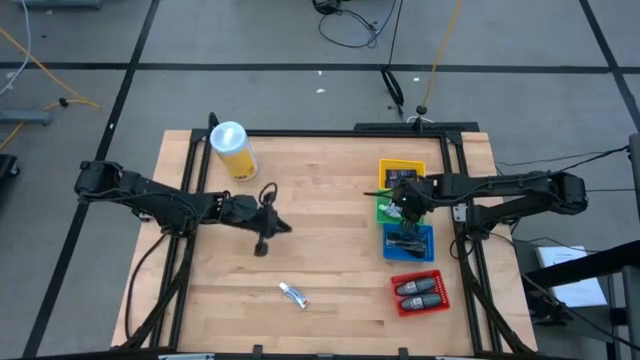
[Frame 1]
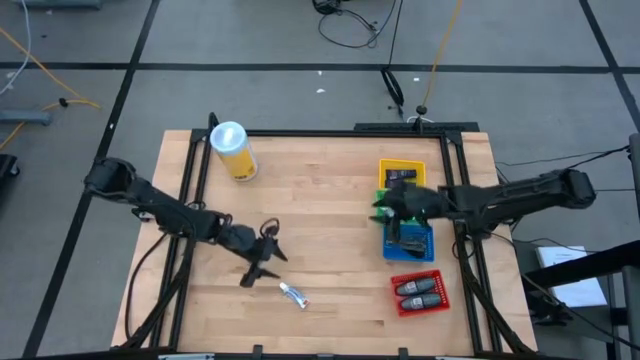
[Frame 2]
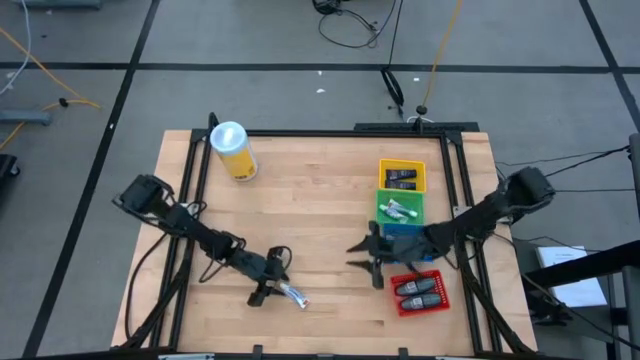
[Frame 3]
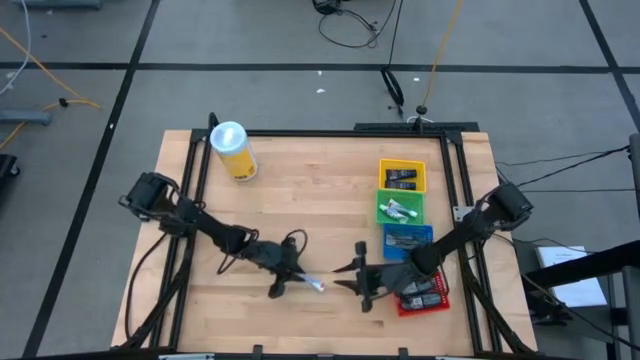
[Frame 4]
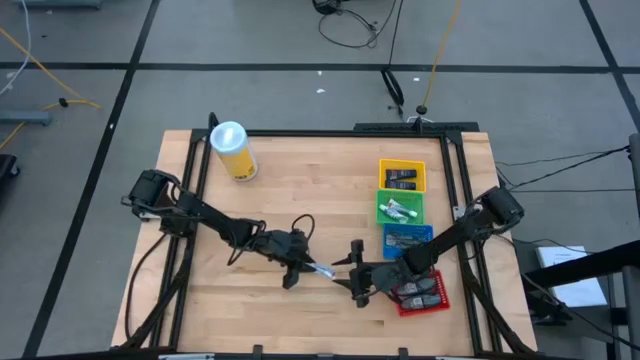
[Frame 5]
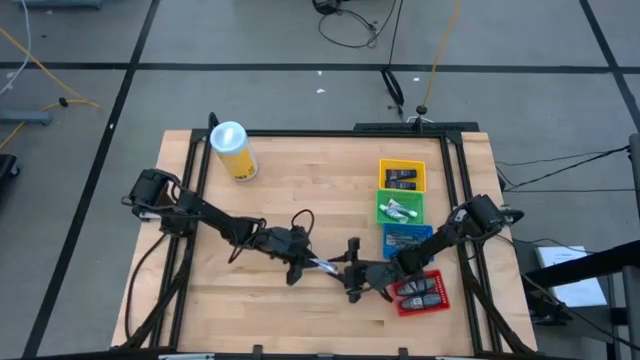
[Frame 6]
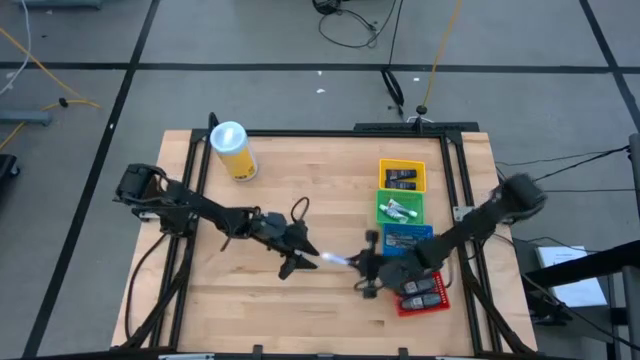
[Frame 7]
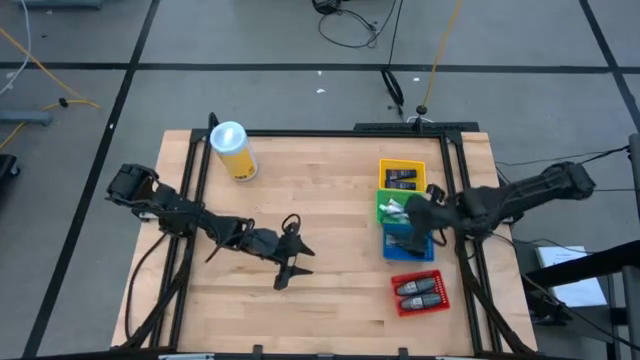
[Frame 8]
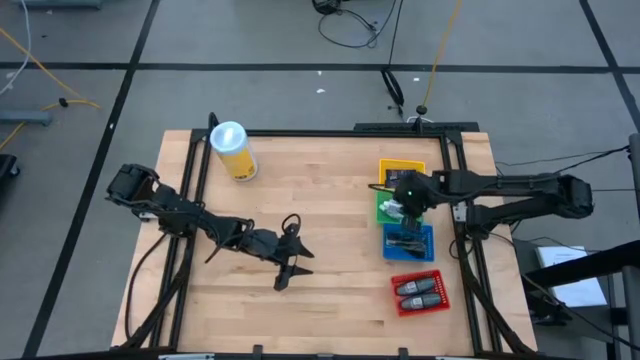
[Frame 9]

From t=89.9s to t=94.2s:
Task: Pick & Place Travel size toiletries
Put the white toothpaste into the green bin

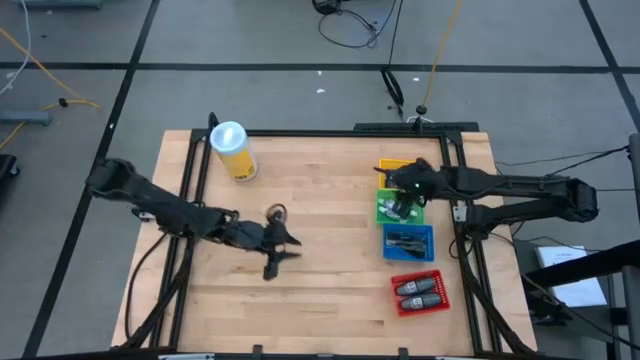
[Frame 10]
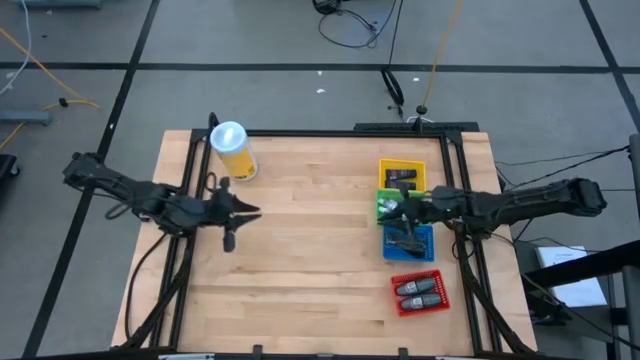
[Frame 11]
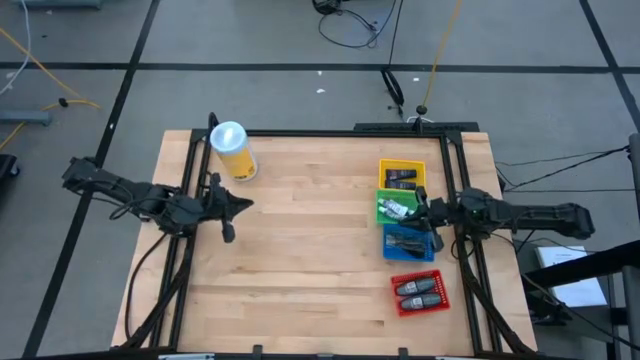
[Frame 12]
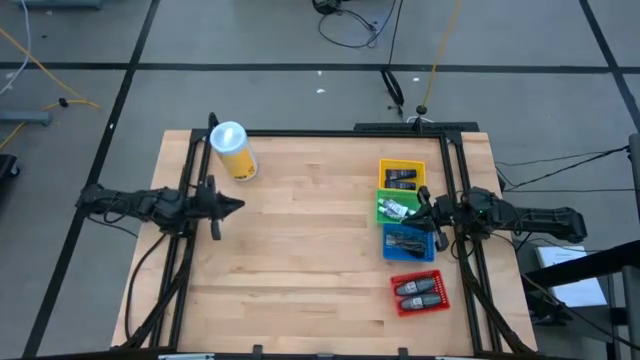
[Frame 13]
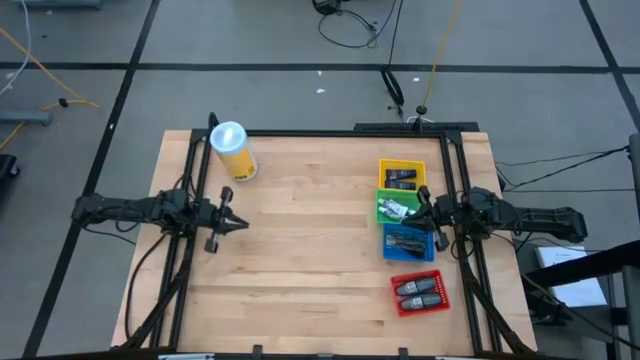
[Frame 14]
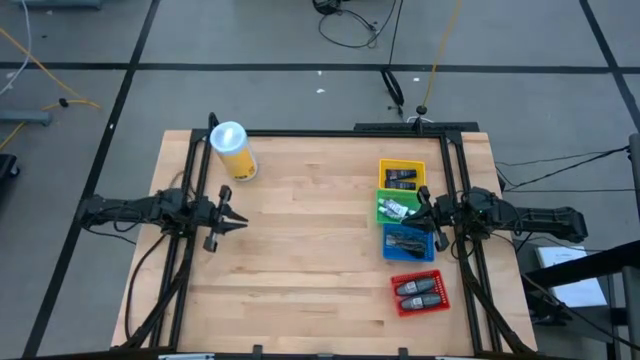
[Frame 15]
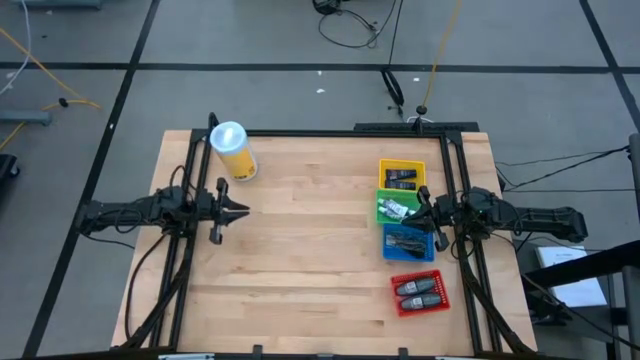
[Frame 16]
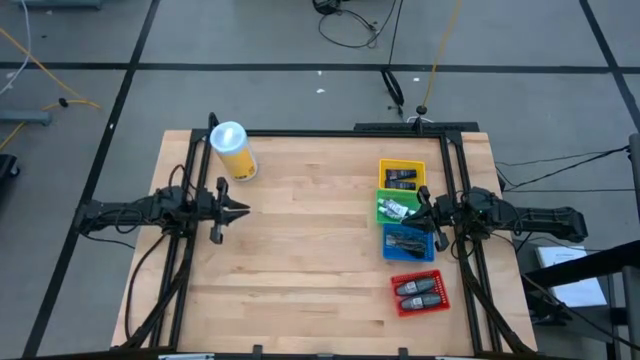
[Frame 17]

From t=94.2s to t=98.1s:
Return to Home Position

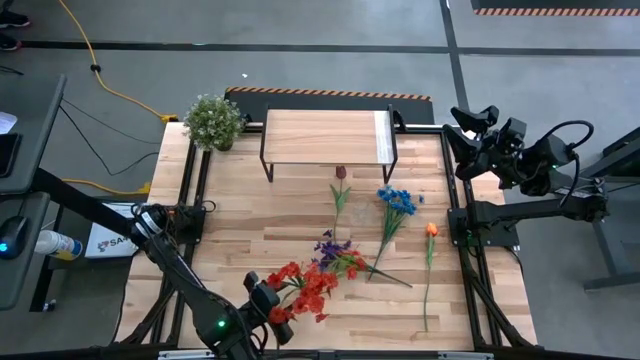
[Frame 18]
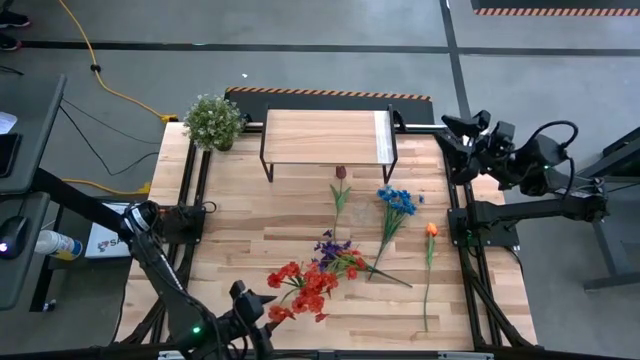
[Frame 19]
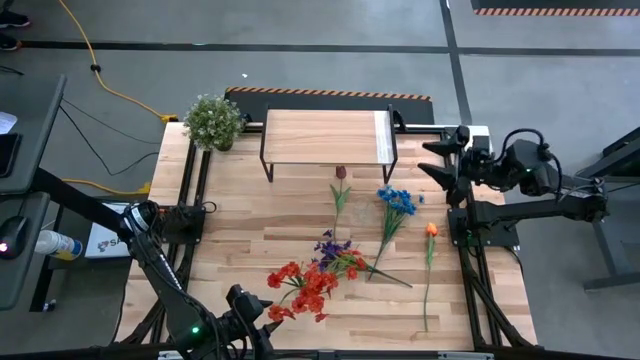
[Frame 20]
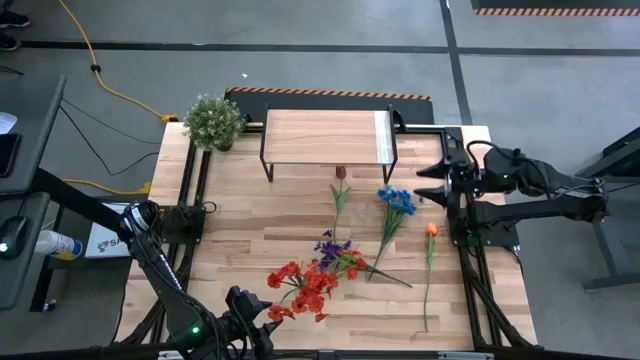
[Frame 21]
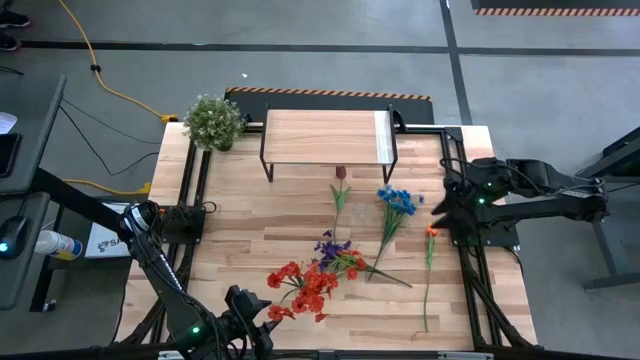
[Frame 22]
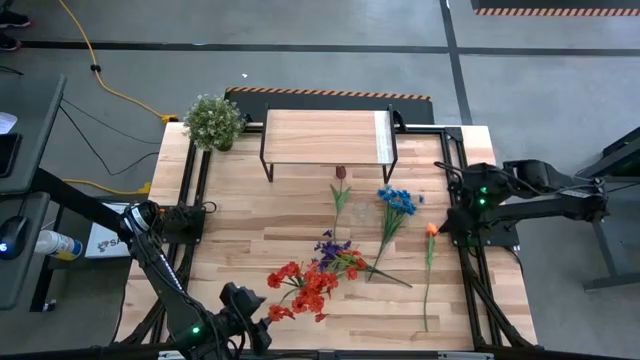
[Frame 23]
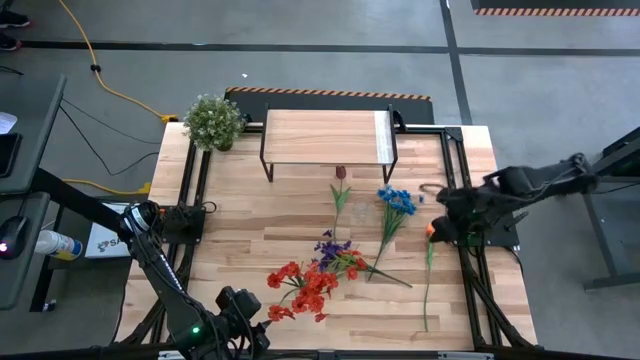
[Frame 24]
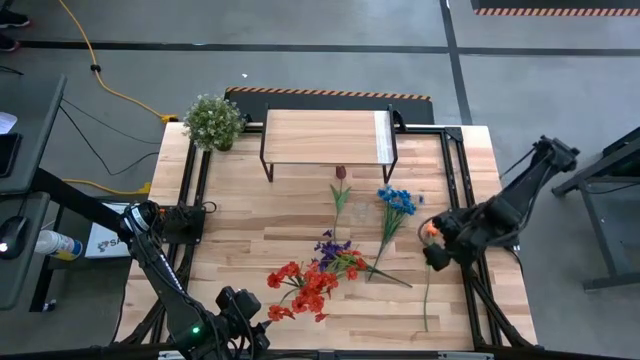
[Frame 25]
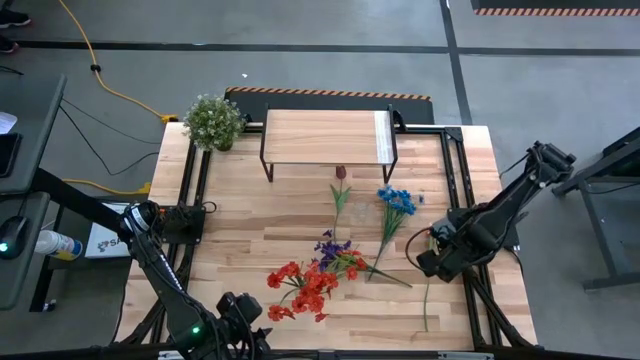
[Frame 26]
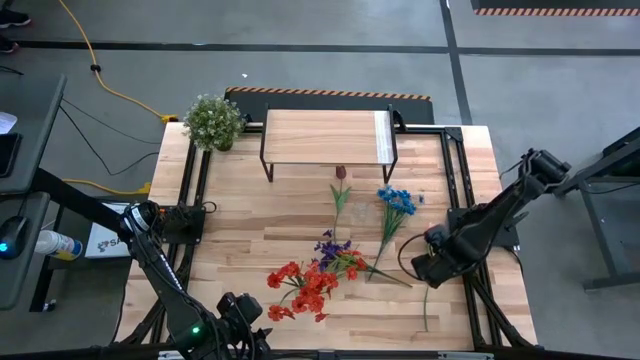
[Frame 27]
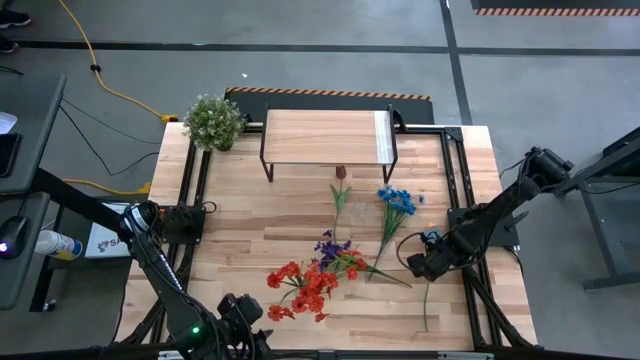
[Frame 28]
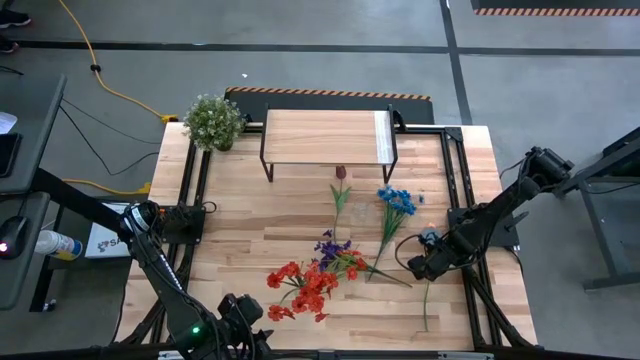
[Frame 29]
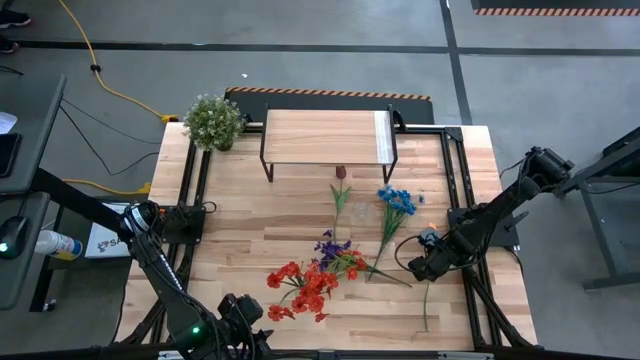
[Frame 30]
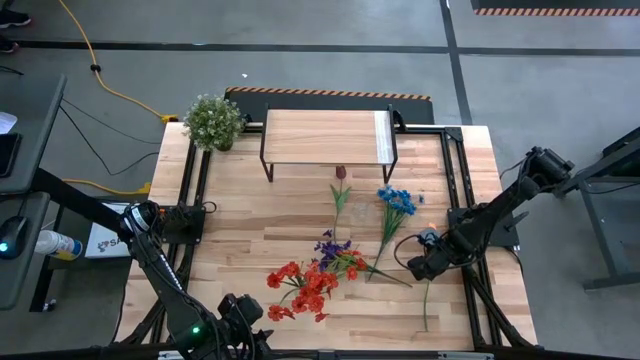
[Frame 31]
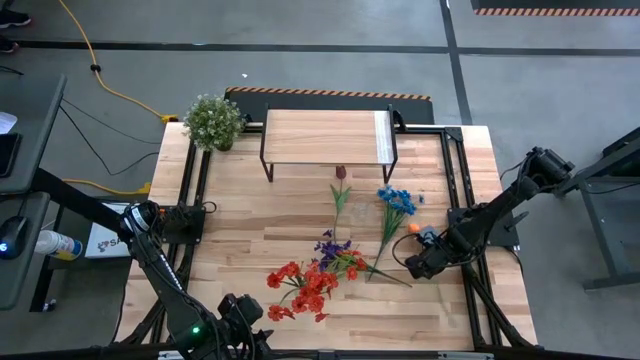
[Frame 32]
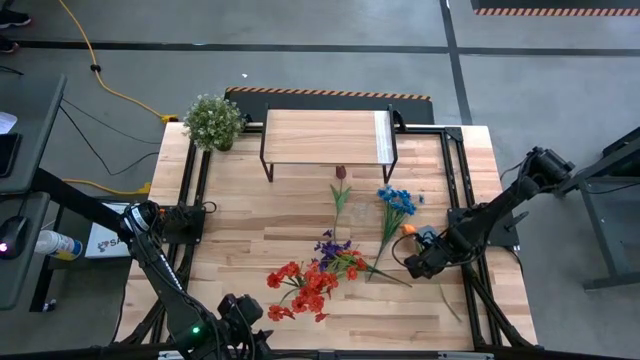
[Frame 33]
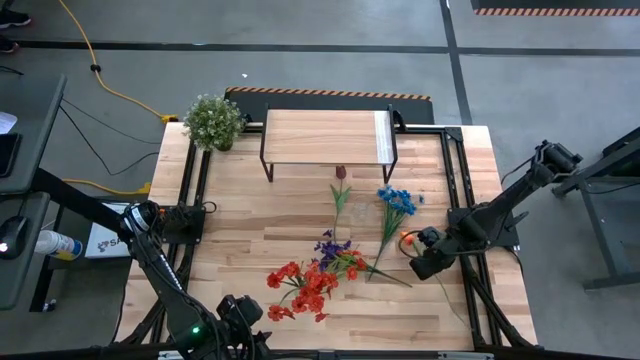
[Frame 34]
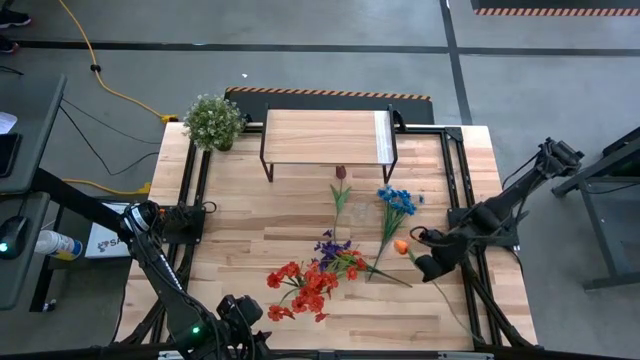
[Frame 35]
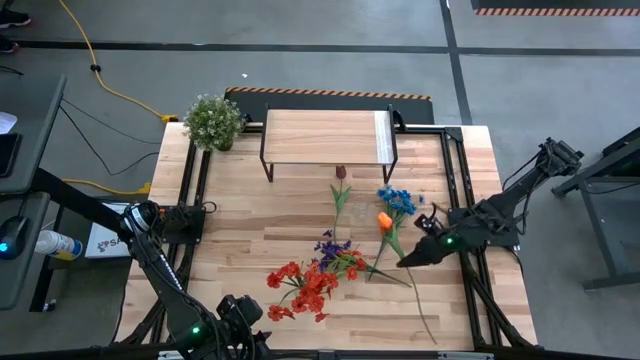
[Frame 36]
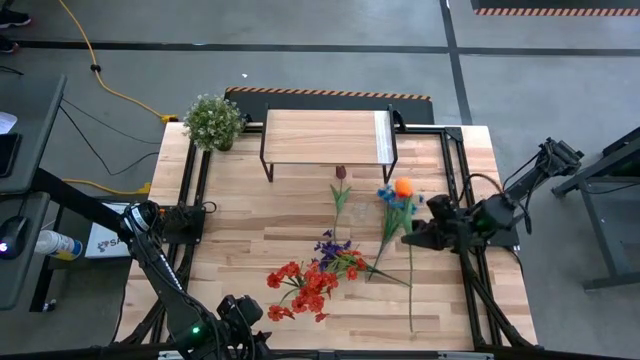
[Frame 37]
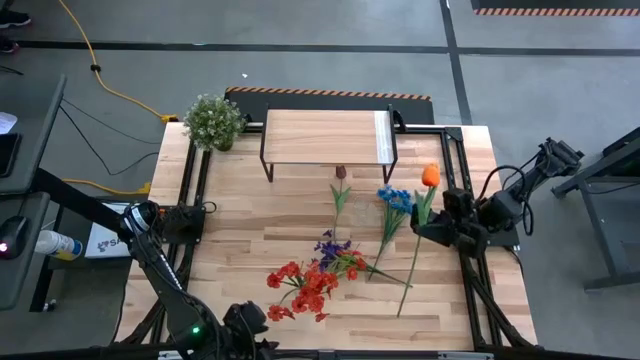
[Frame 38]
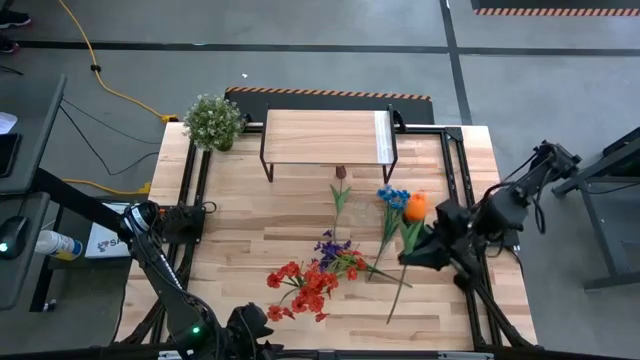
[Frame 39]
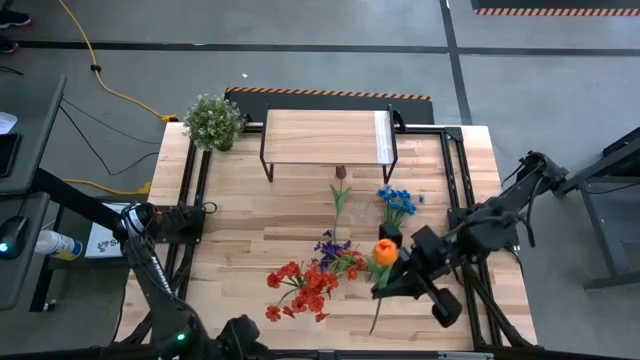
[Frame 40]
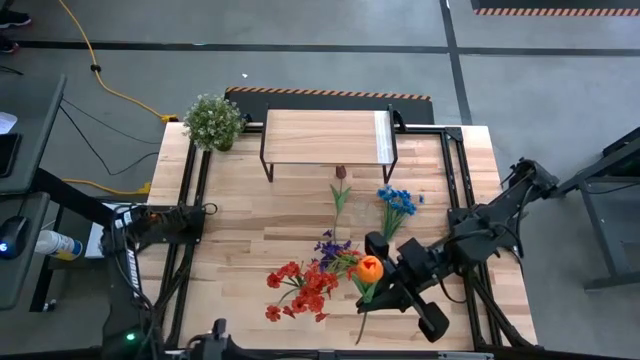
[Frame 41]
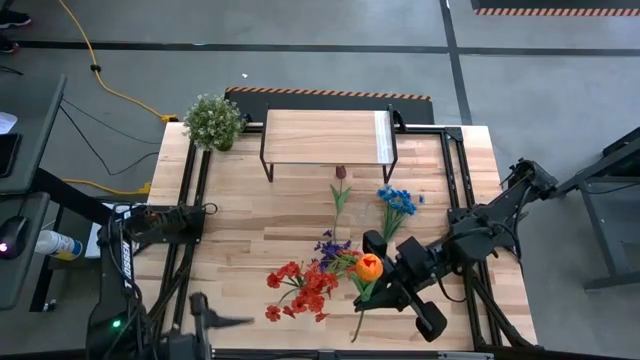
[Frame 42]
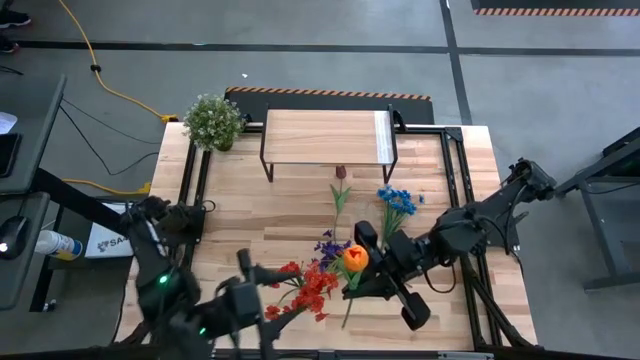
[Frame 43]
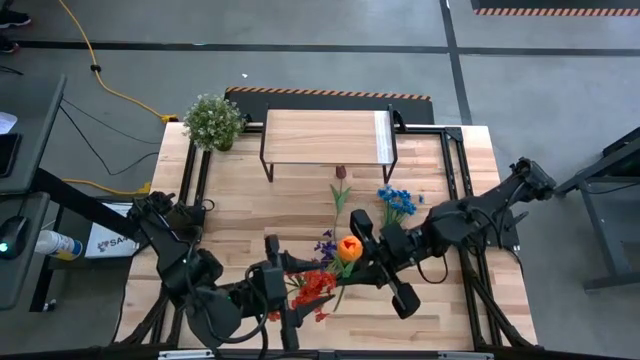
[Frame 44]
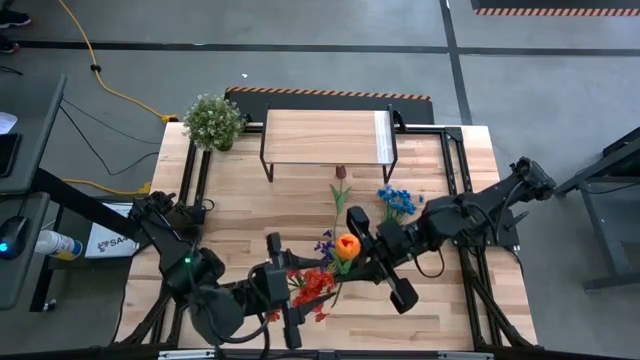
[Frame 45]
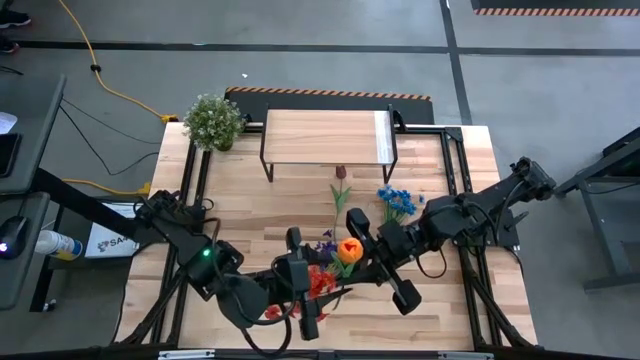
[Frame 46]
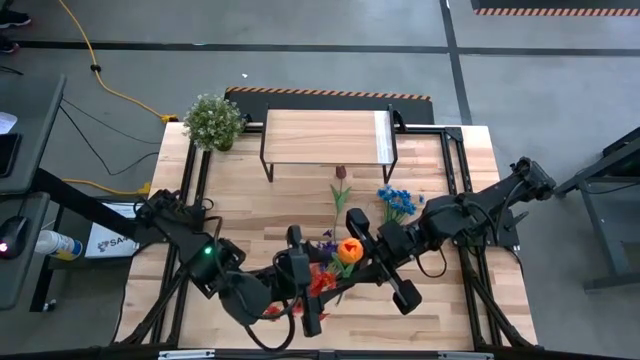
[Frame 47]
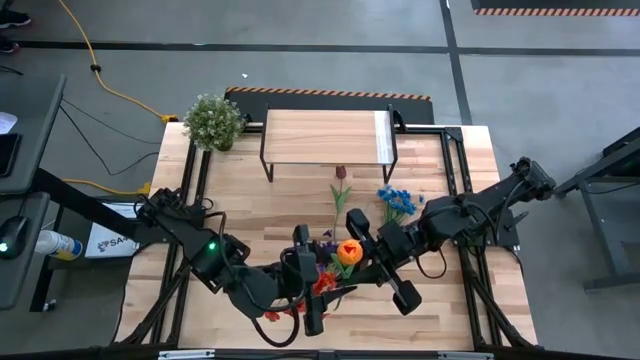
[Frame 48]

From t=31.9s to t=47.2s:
Task: Pick and place flowers into a vace then onto a shelf
Put the orange flower into the bottom transparent vase
